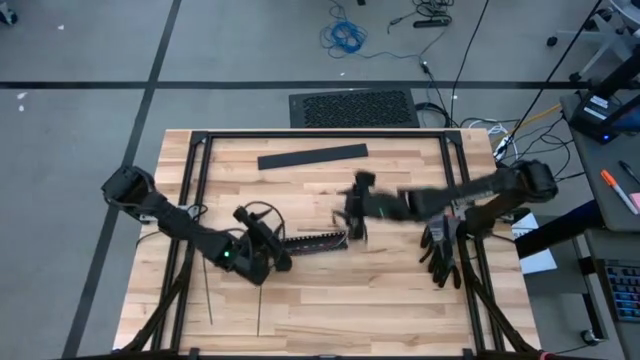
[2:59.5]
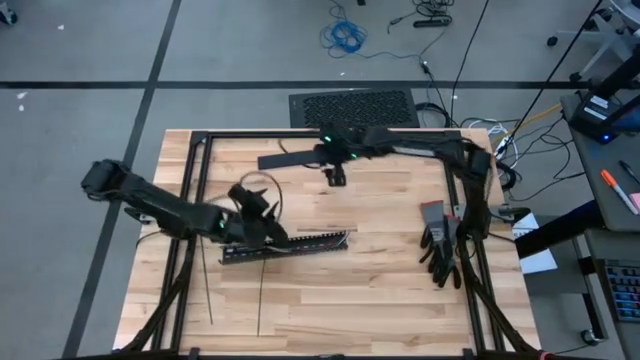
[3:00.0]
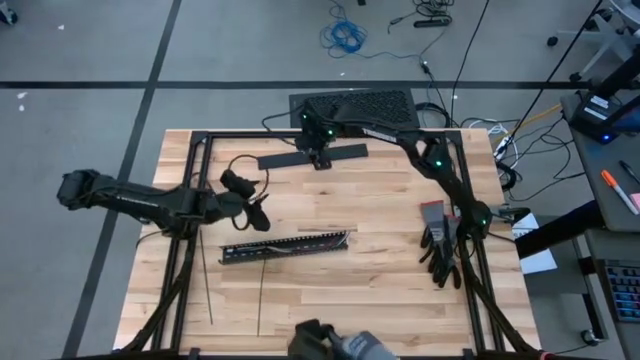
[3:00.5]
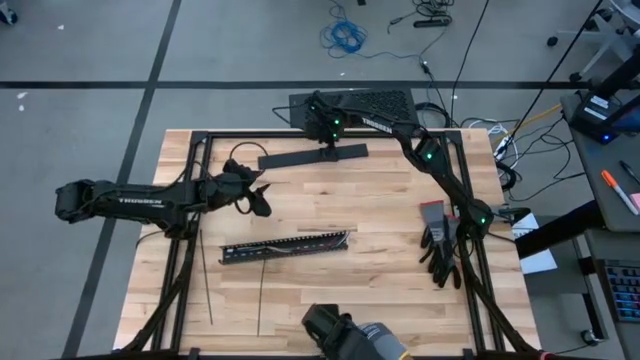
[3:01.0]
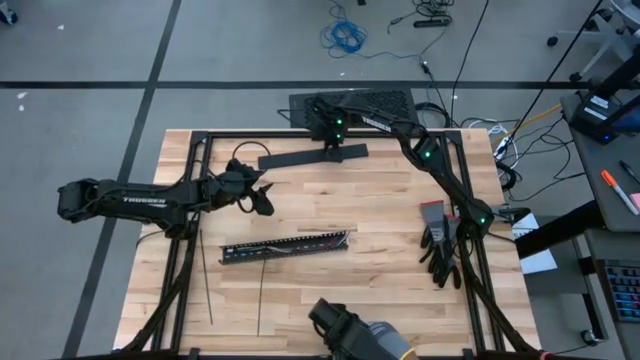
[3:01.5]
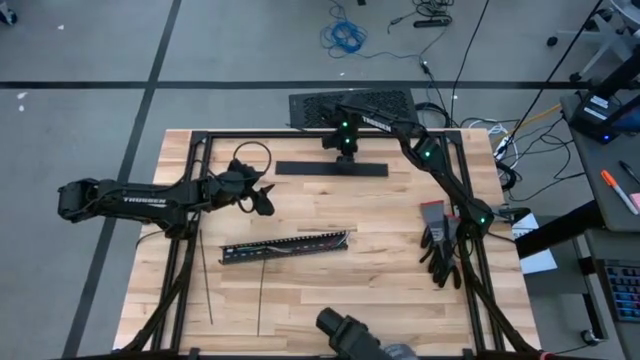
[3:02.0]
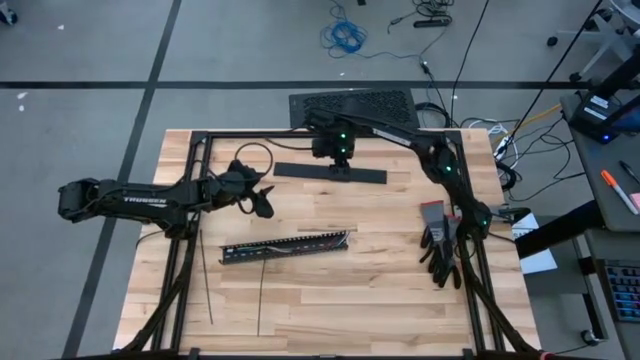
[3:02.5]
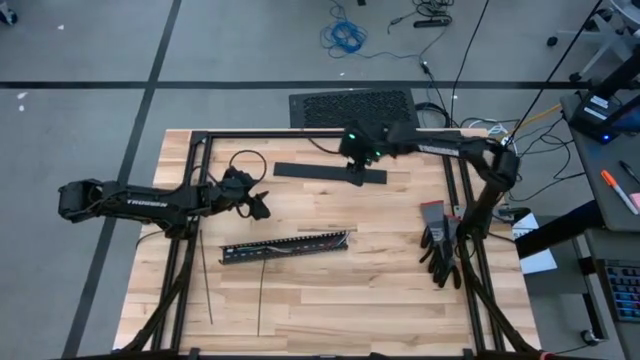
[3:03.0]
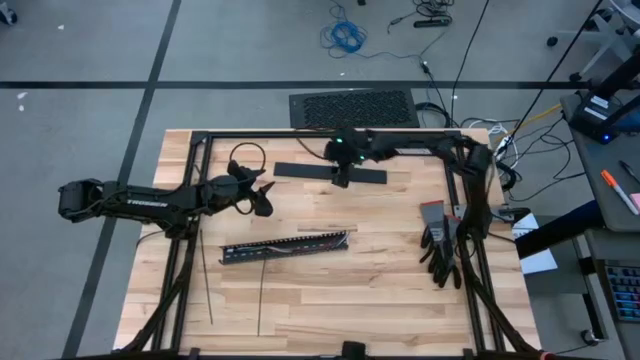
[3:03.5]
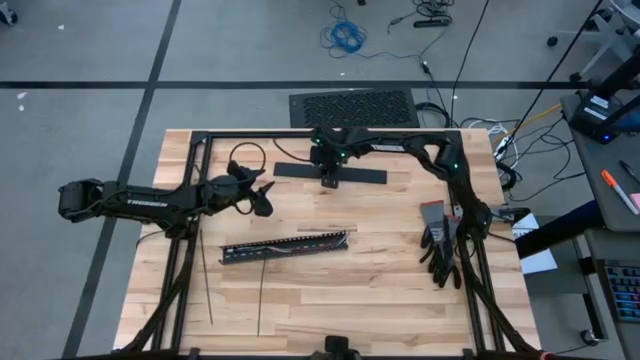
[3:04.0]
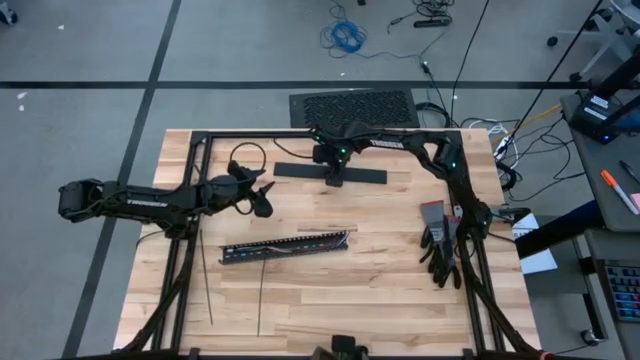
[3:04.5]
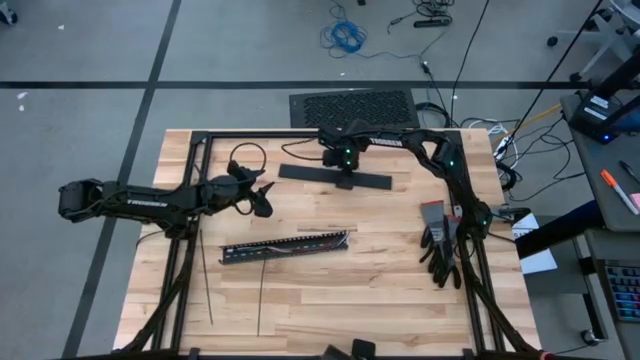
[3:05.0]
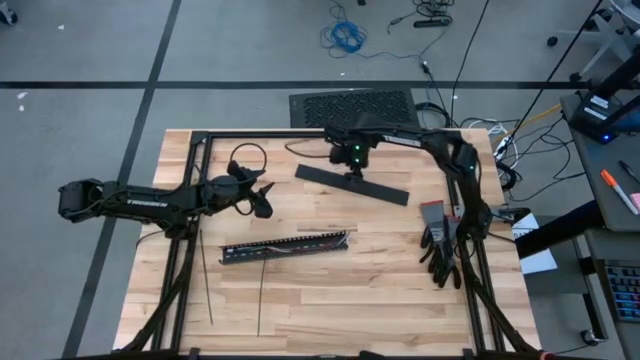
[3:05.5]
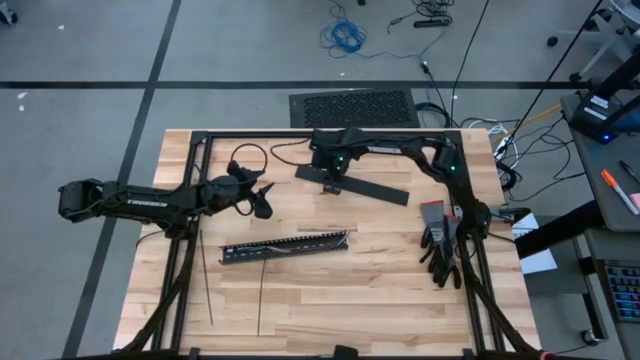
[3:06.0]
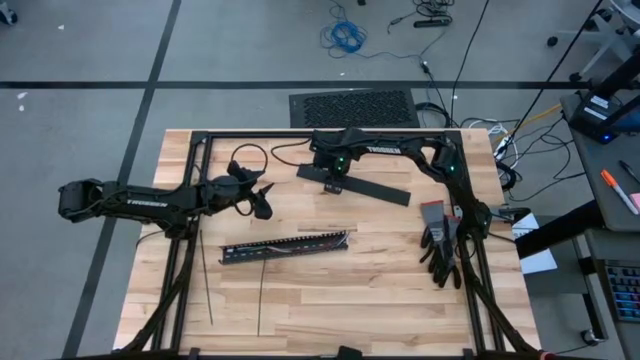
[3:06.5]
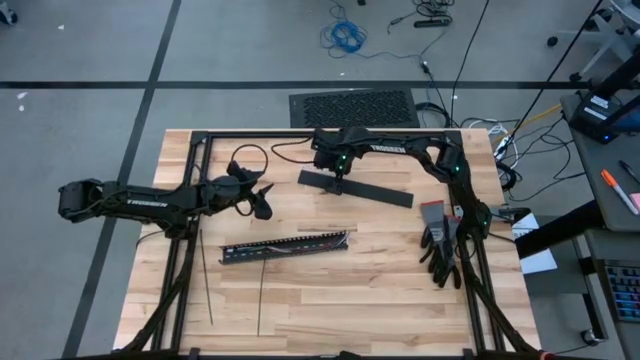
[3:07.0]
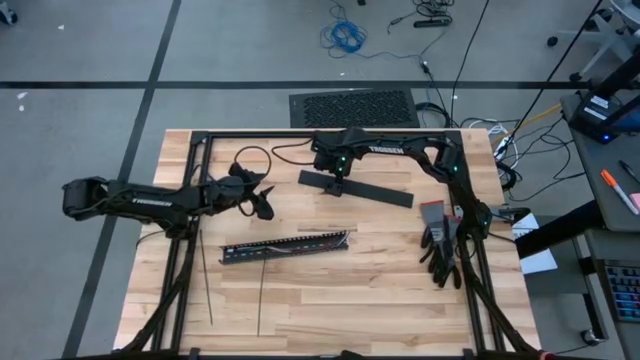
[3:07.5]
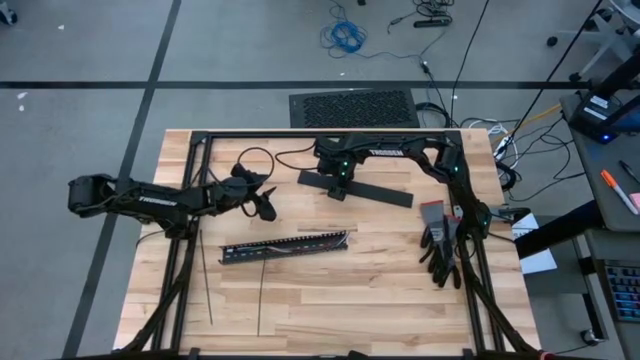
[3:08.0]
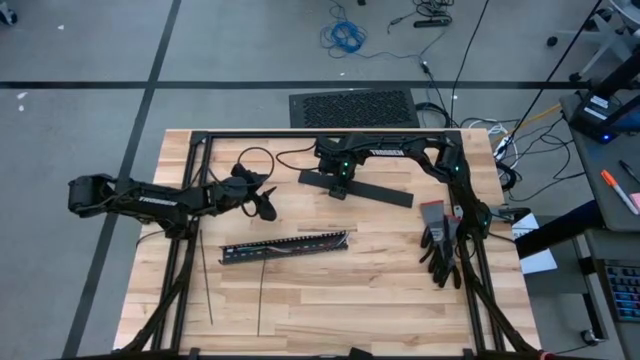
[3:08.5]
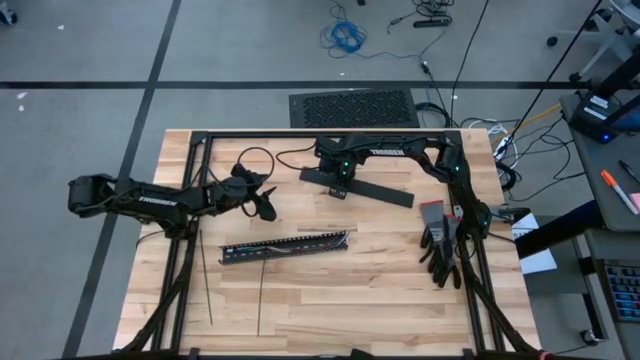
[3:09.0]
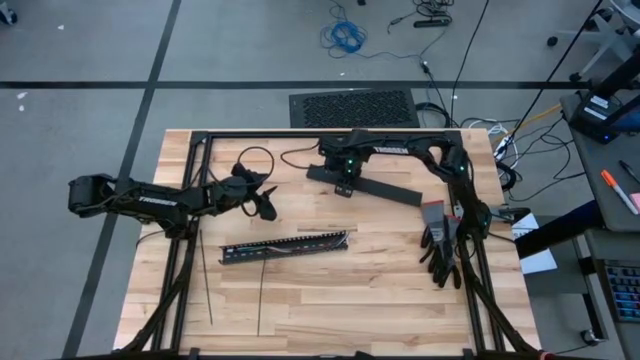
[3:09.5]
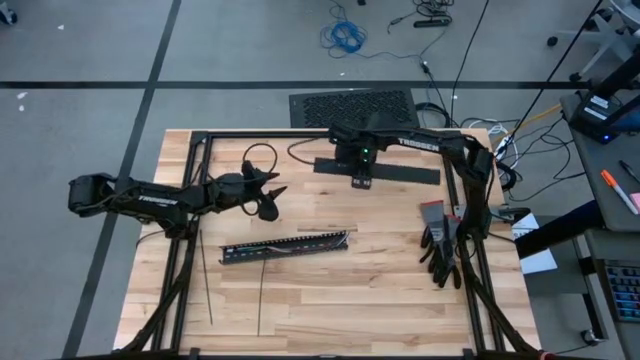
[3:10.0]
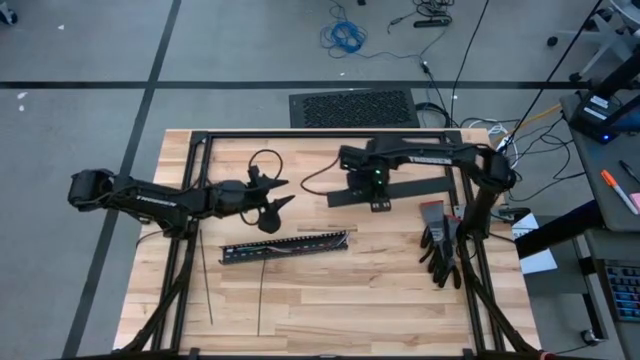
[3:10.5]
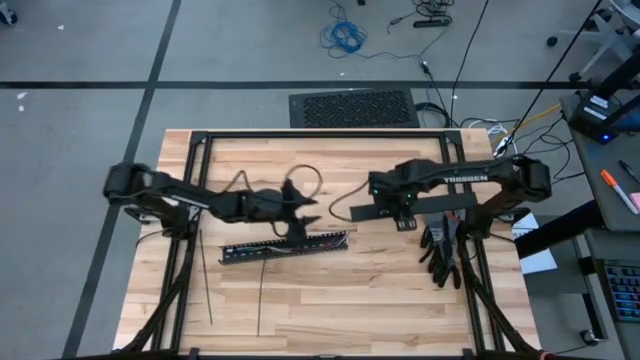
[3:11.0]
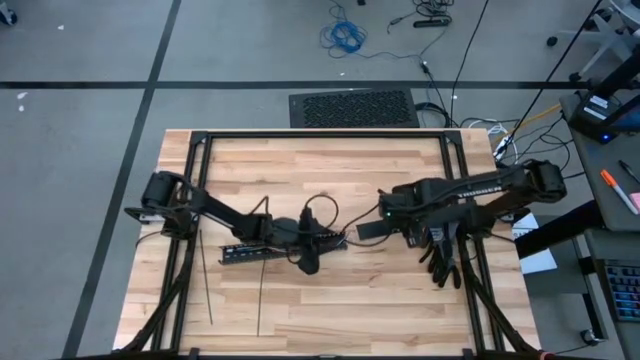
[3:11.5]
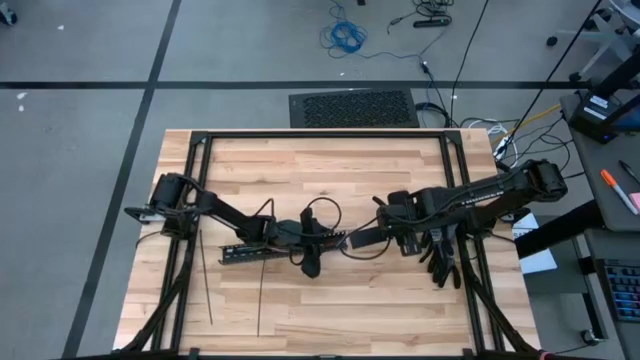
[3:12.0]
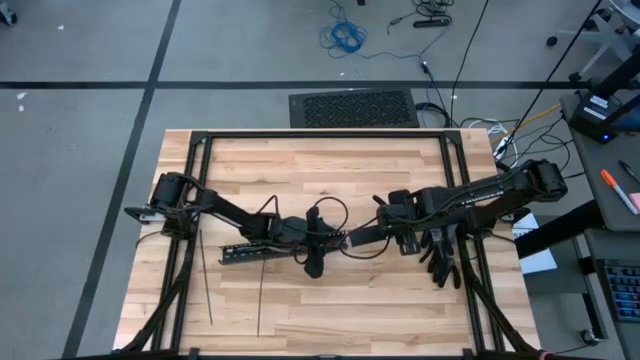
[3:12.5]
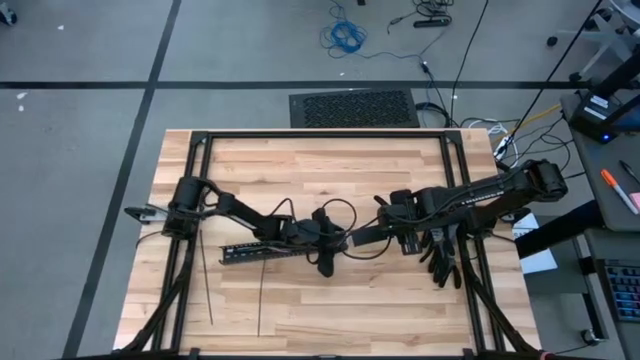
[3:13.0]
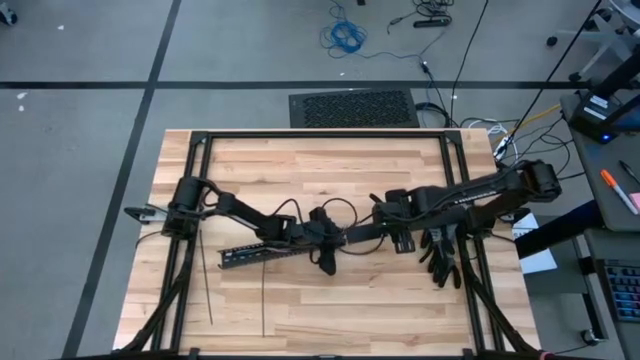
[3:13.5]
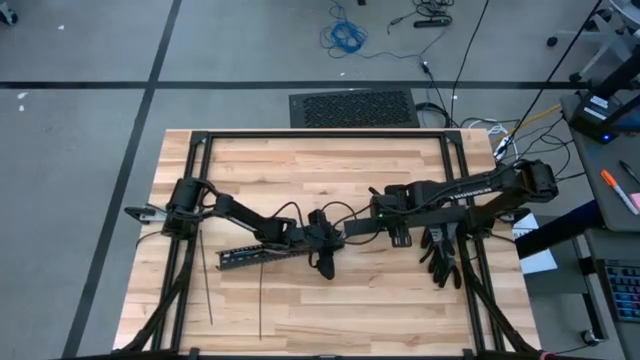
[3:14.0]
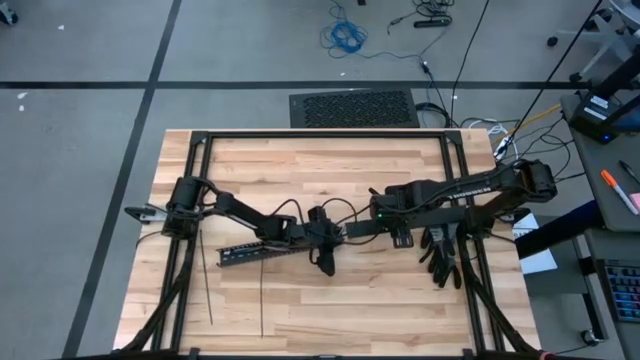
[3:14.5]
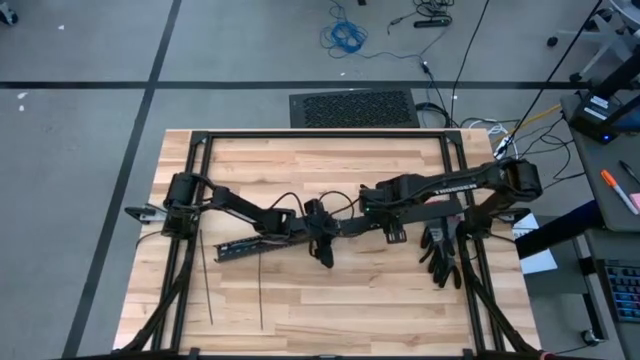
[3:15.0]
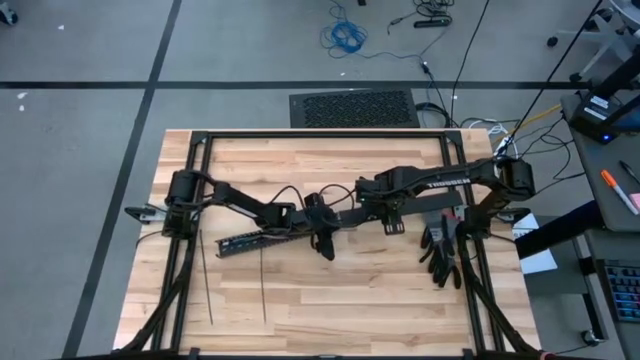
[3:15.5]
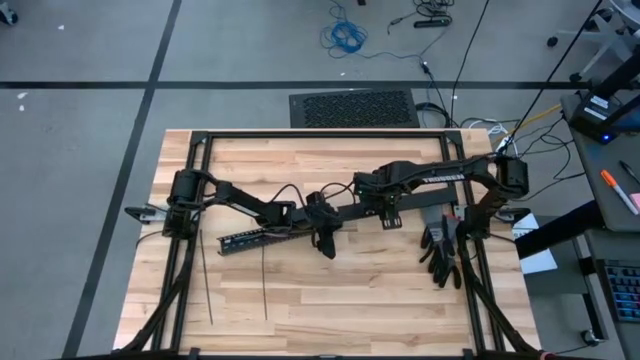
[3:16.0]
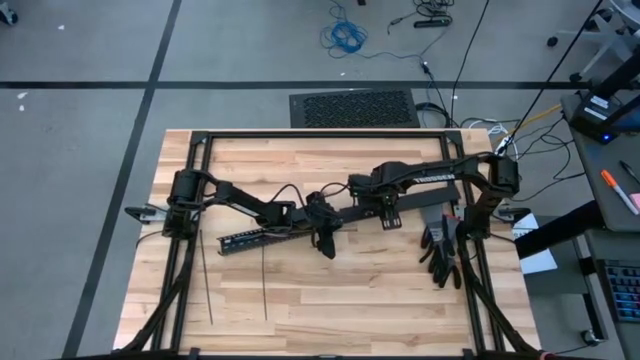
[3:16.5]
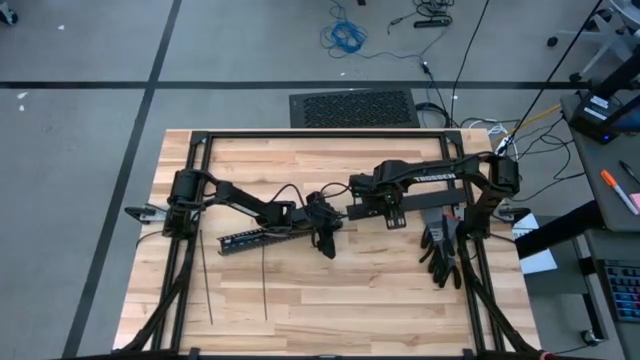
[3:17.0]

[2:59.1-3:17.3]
Task: Ziptie cables
Close the black cable duct with the cable duct cover
